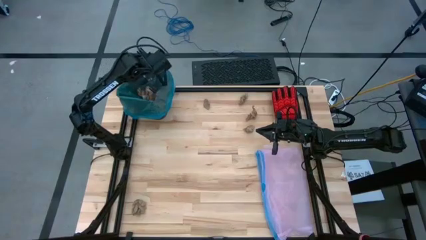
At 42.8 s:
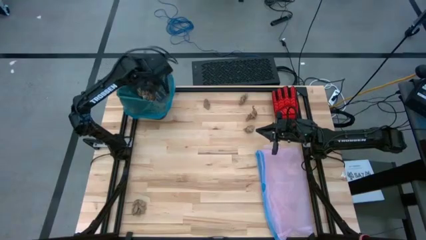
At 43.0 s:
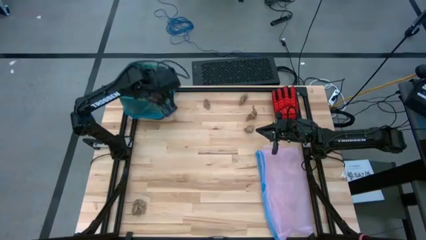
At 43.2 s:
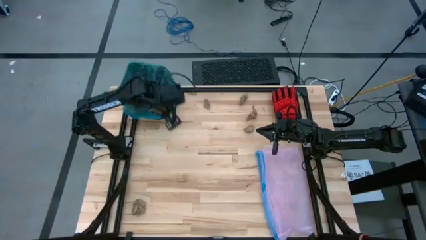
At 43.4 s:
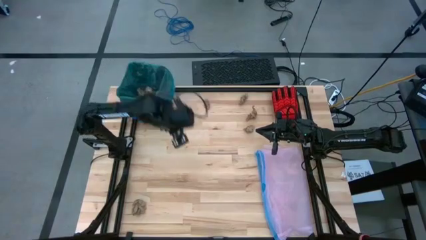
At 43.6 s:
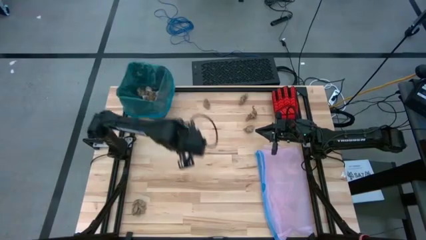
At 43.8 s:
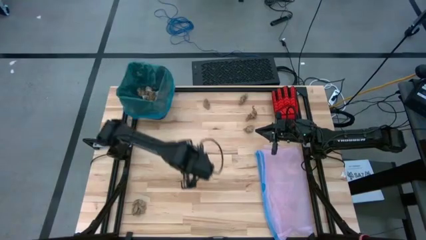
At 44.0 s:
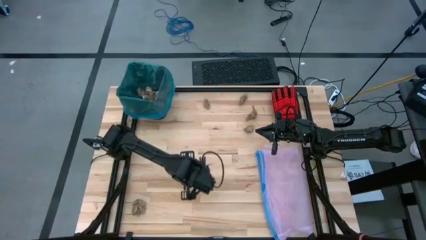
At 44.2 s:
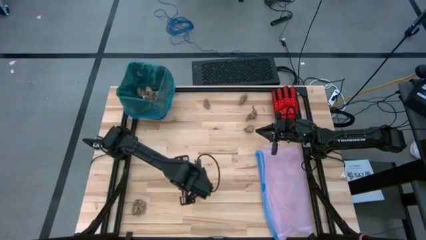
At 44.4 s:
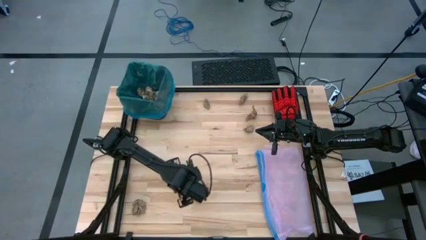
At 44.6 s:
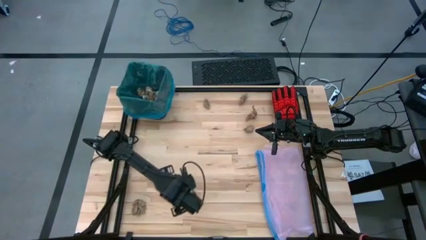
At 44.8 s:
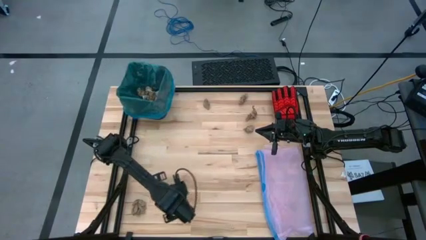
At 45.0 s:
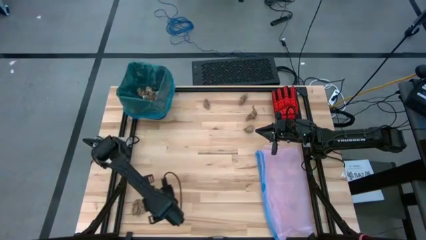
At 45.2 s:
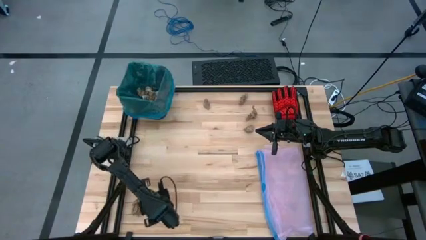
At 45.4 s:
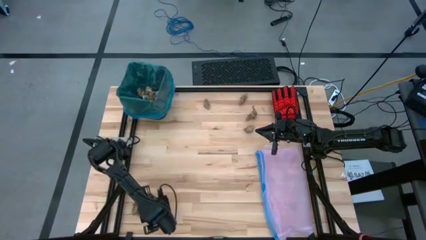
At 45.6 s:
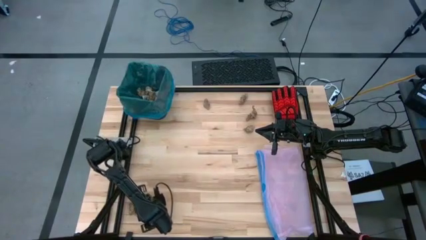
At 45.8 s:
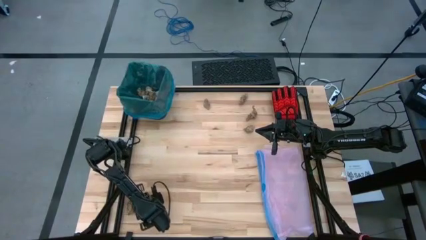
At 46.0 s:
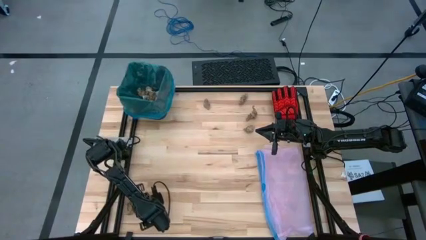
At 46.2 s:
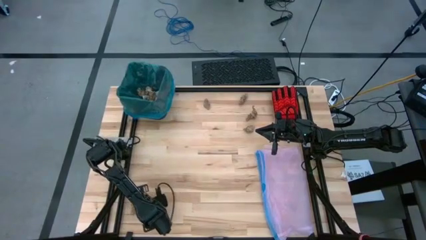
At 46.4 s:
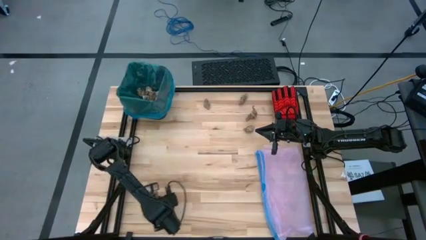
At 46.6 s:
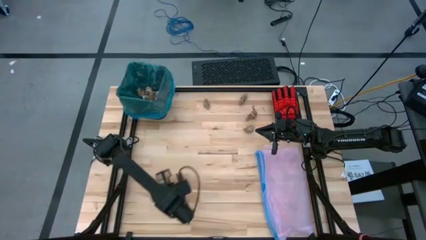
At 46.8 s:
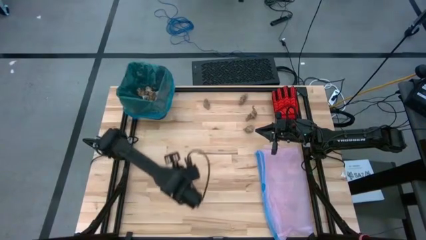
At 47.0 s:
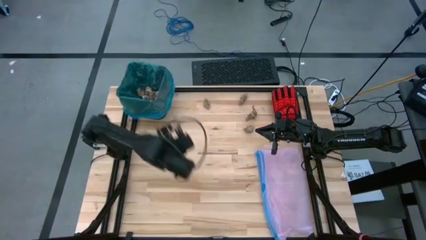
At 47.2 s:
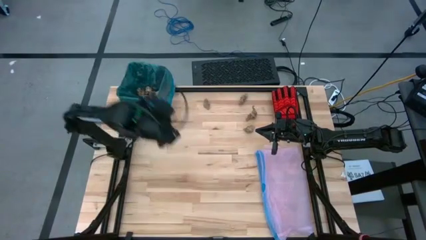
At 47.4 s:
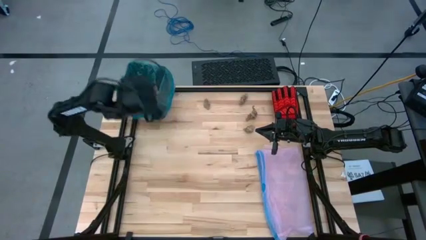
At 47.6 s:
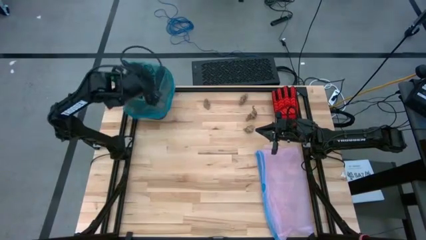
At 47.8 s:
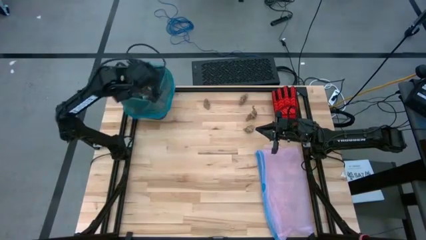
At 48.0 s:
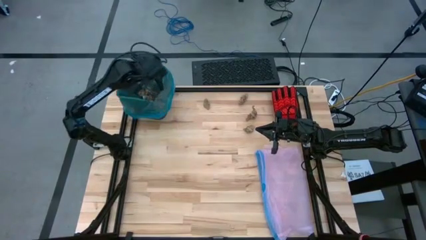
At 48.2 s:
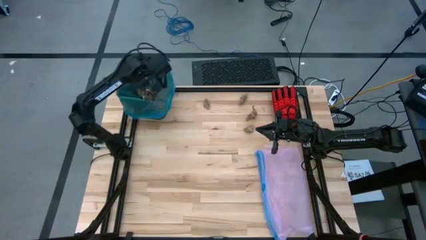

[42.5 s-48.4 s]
Task: place trash/remove bag and relplace
Put the brown napkin into the black trash bin

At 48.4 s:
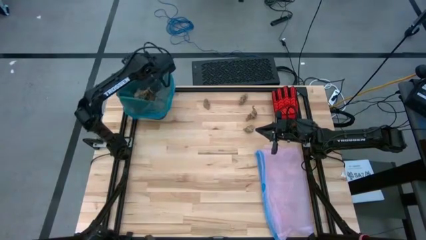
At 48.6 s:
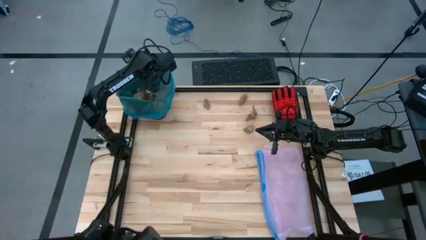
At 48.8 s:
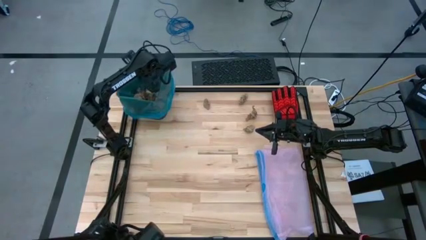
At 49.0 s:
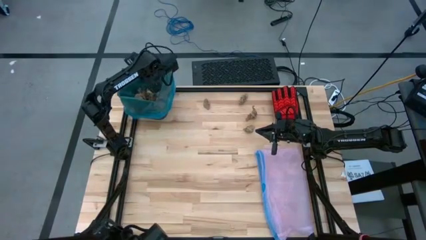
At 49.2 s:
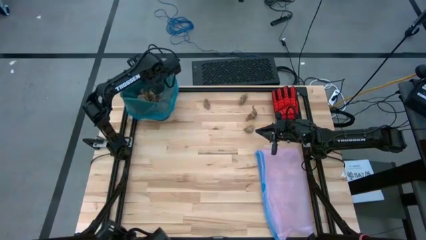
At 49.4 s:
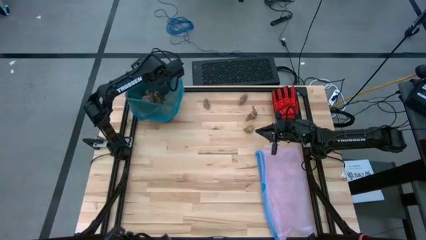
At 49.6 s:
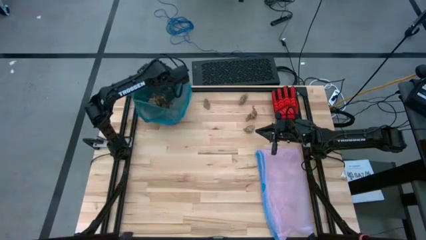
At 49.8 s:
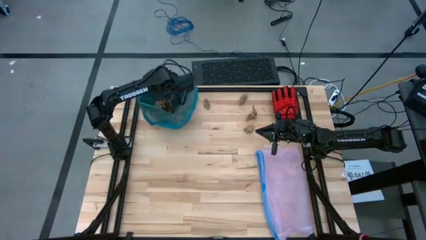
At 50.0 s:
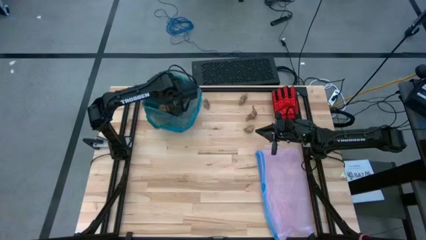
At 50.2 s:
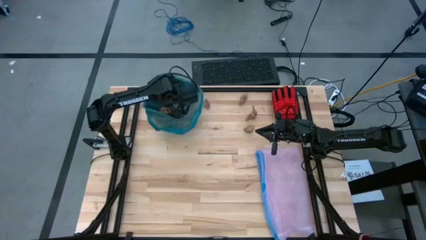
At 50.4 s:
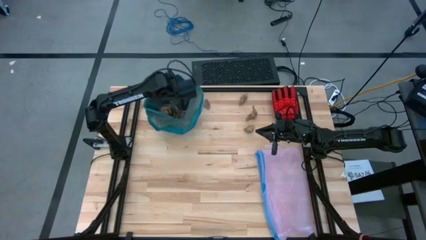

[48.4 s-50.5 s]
Adjust the black trash bin

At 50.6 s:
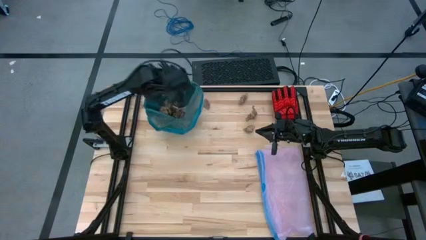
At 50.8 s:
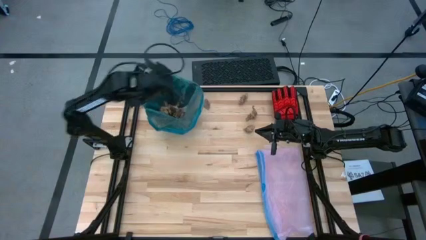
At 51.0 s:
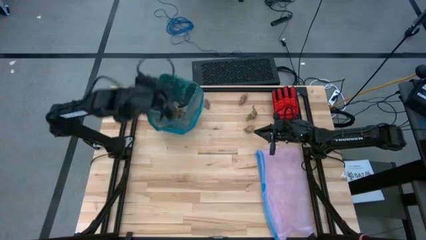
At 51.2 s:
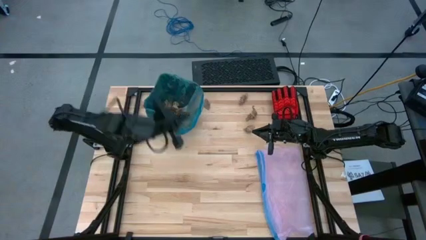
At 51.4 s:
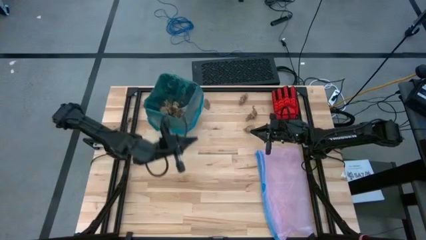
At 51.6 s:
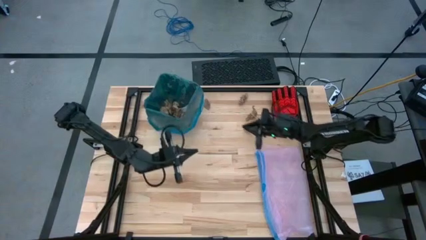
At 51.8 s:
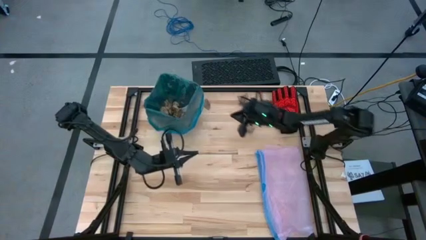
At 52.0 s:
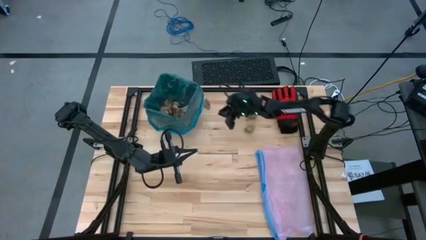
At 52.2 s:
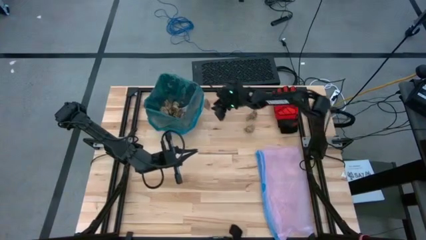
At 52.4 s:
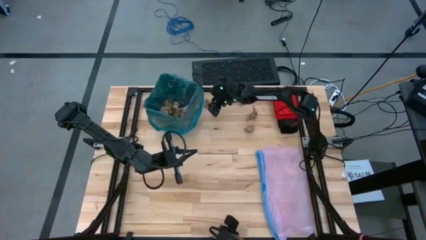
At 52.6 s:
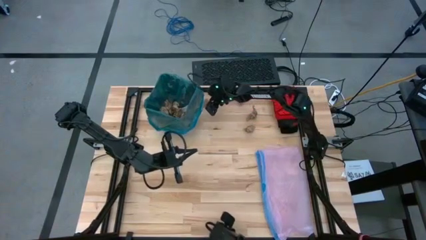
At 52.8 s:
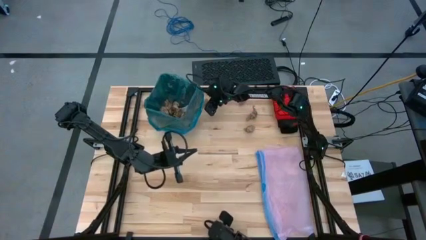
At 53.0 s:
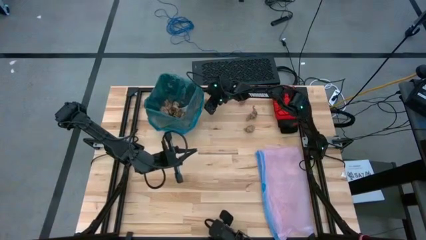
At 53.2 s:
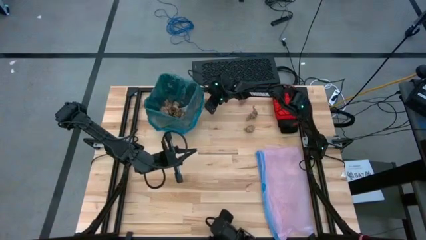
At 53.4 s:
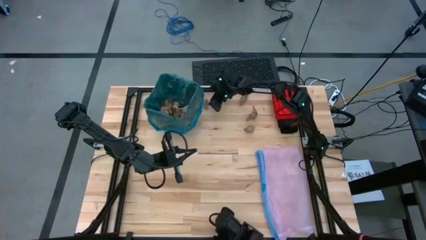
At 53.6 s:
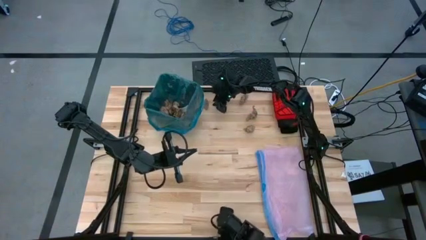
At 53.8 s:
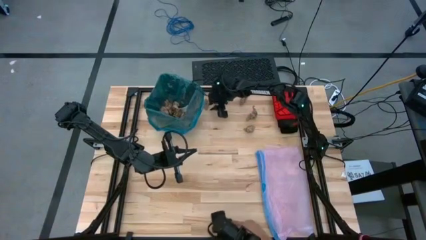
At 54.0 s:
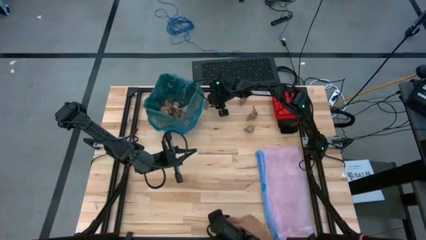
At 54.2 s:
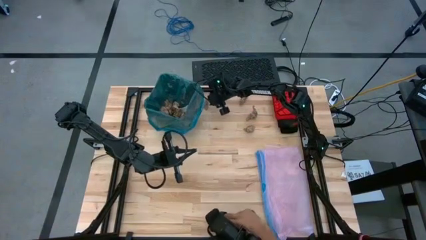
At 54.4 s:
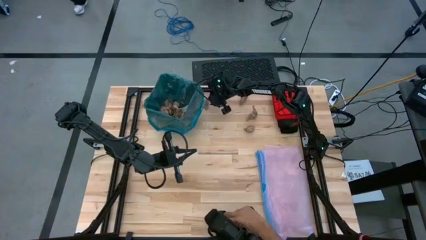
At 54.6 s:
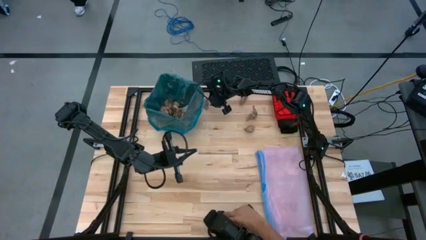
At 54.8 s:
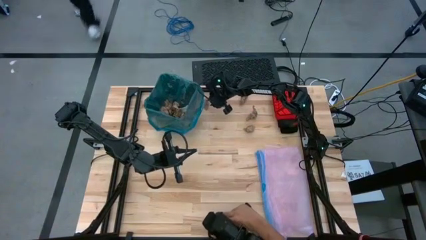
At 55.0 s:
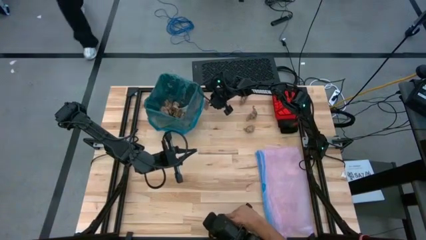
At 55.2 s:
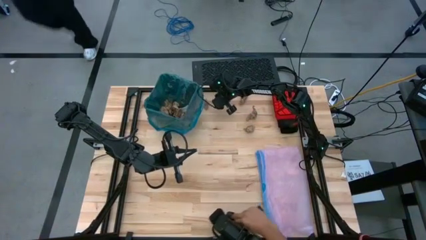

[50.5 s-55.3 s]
Put the brown paper into the black trash bin

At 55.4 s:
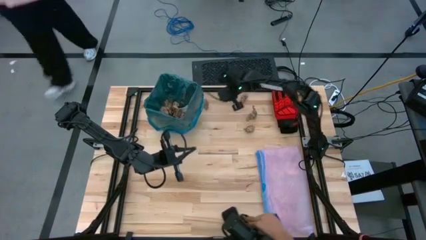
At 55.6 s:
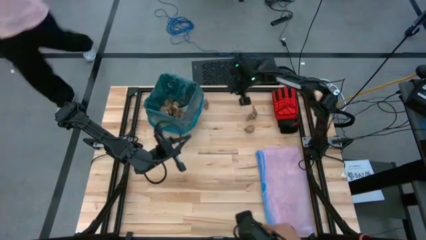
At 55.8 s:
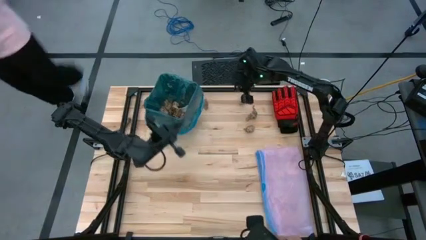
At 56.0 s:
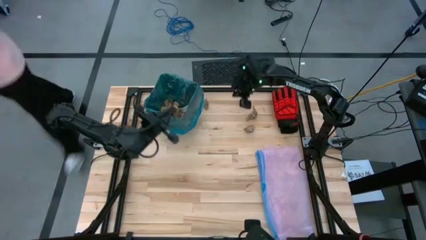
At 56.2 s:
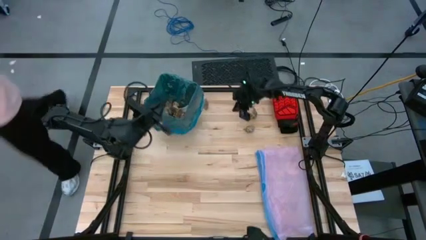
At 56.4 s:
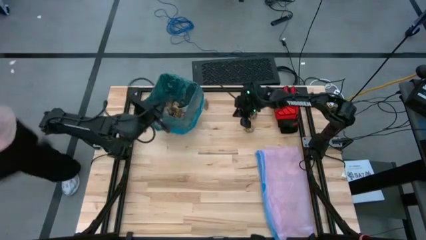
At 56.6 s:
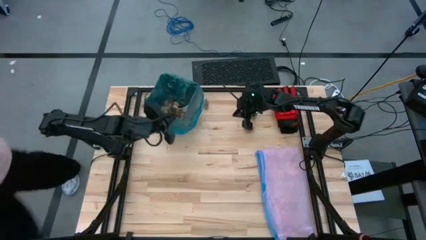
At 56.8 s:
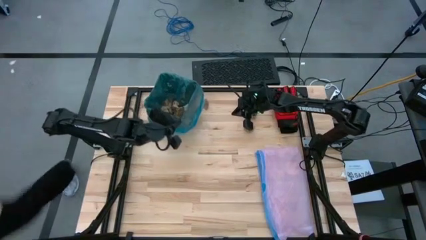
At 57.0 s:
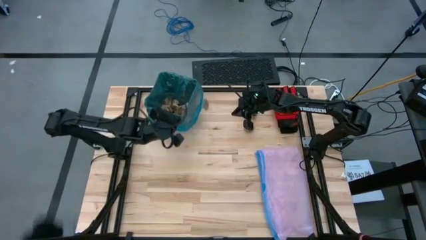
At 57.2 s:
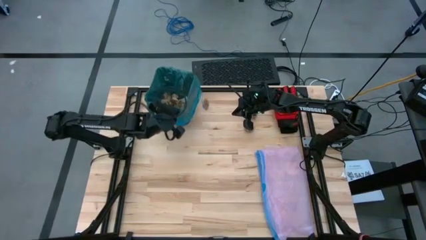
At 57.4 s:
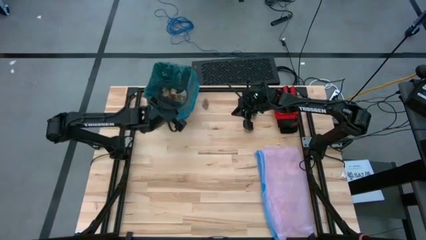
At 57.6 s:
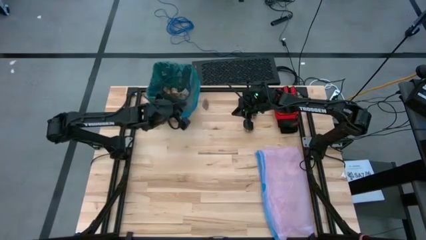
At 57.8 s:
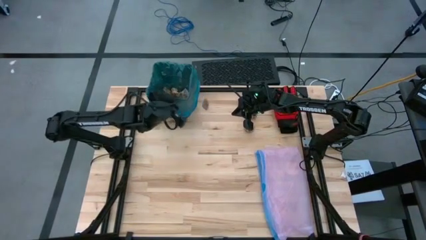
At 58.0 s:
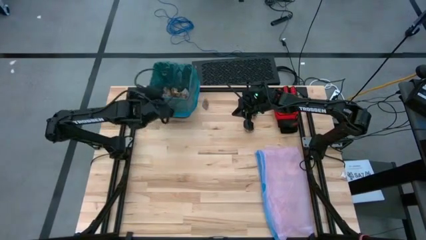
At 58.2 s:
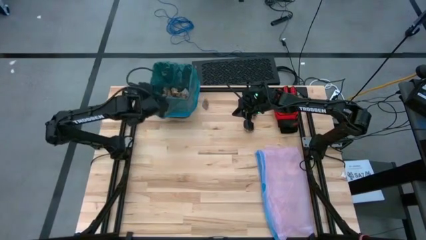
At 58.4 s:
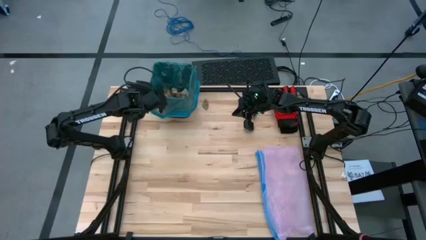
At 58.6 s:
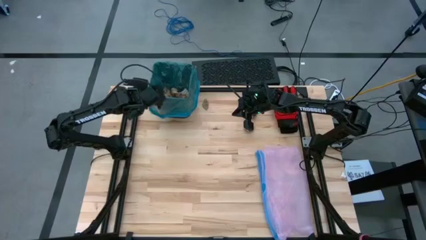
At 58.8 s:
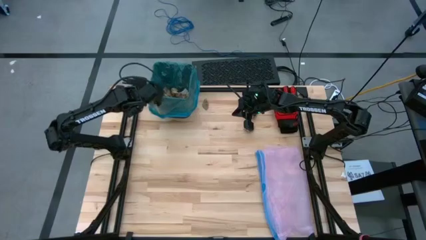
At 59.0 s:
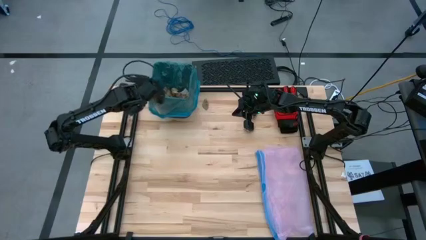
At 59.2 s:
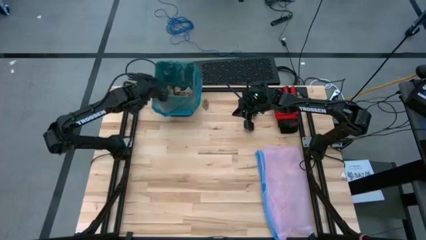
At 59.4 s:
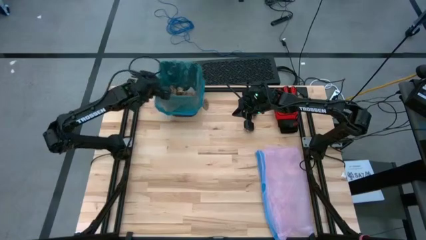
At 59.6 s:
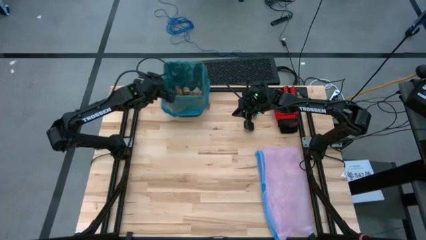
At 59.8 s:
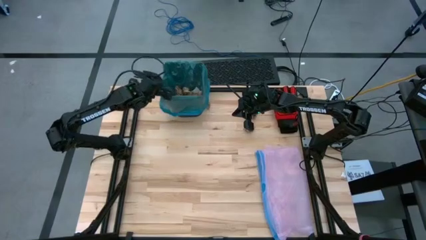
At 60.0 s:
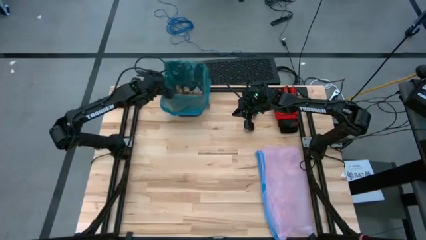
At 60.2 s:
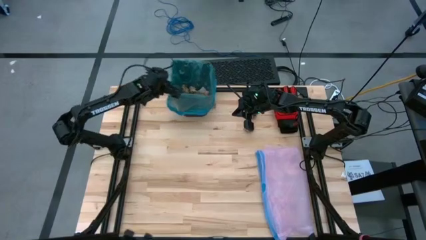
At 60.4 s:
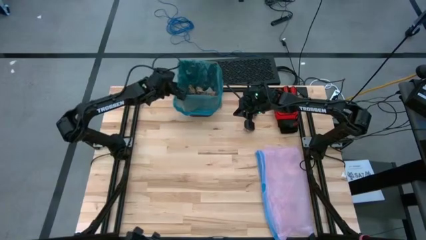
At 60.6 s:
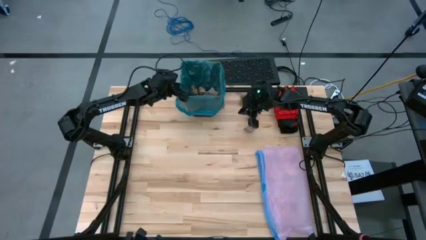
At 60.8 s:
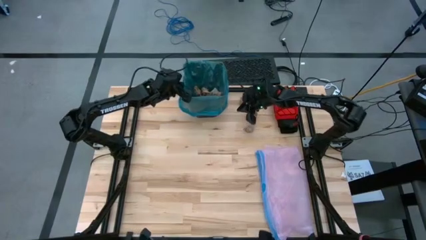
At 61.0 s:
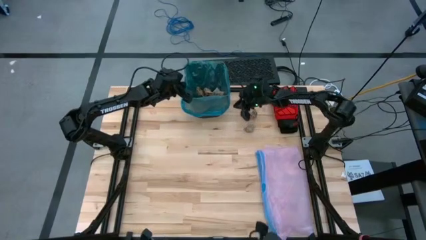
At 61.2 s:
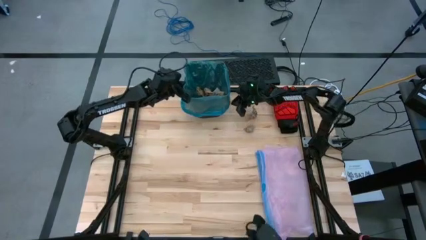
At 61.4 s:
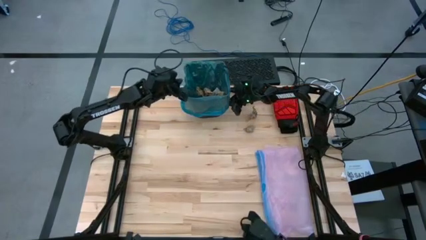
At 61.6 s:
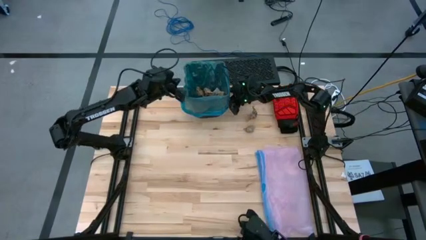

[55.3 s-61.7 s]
Adjust the black trash bin
